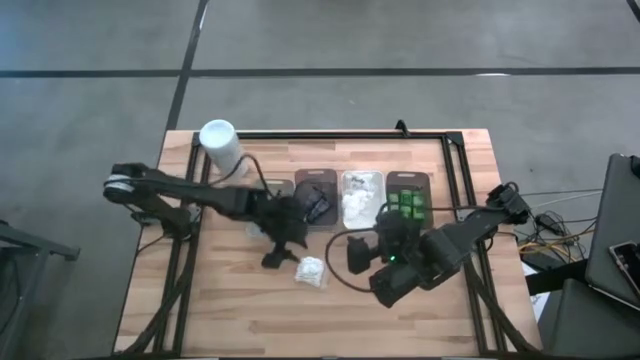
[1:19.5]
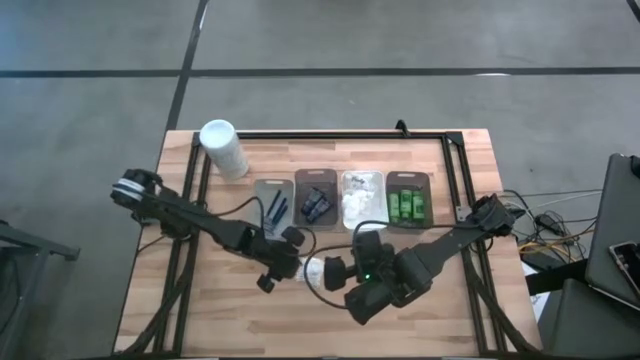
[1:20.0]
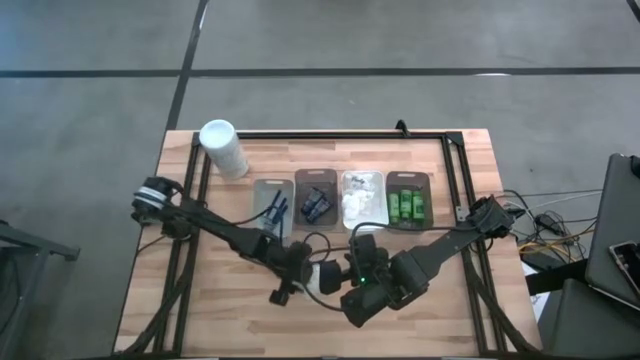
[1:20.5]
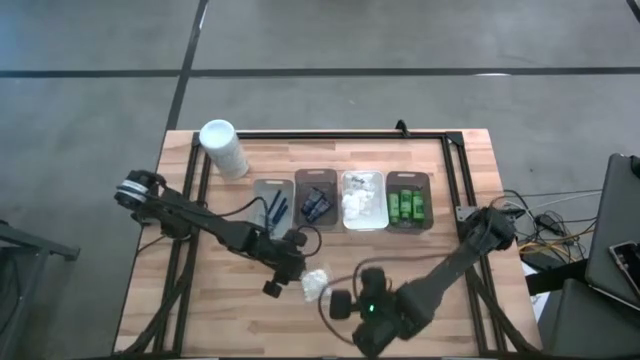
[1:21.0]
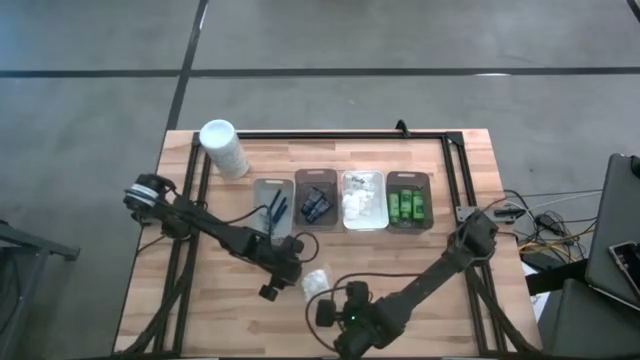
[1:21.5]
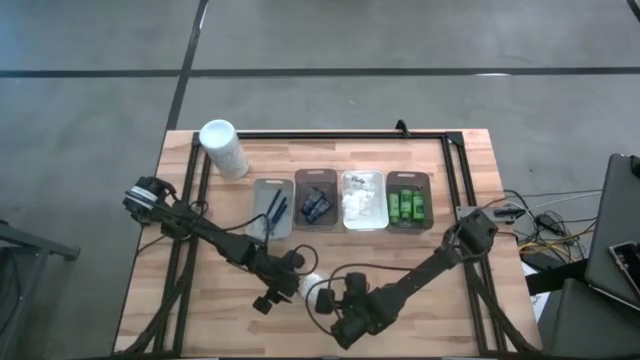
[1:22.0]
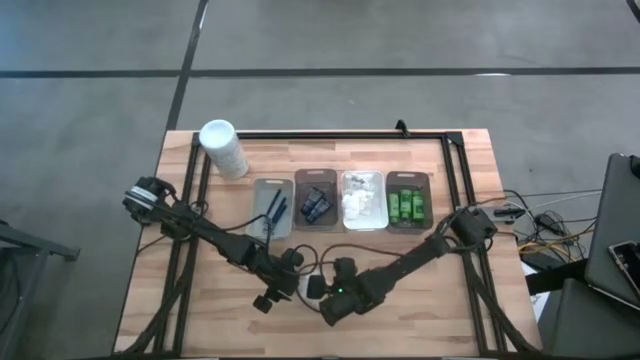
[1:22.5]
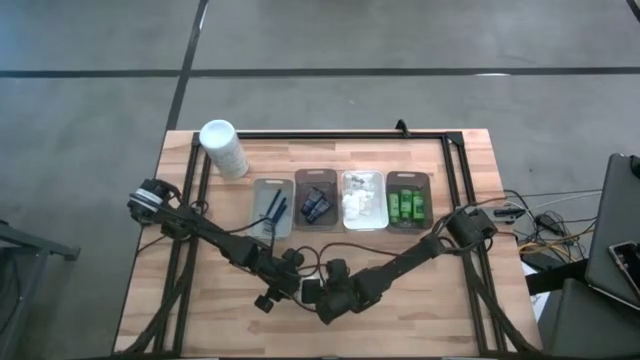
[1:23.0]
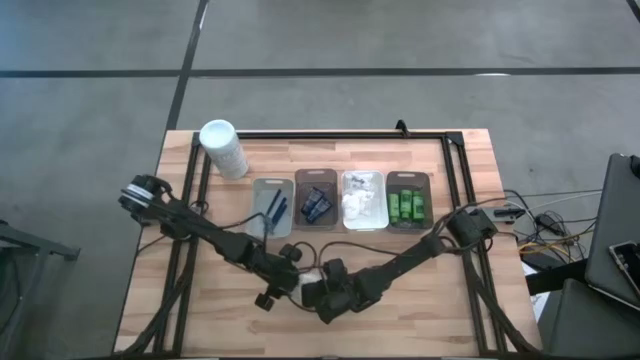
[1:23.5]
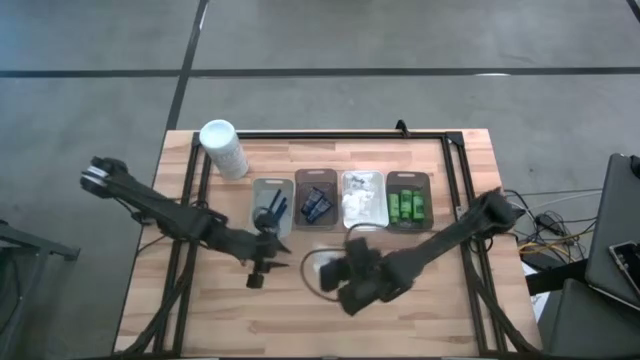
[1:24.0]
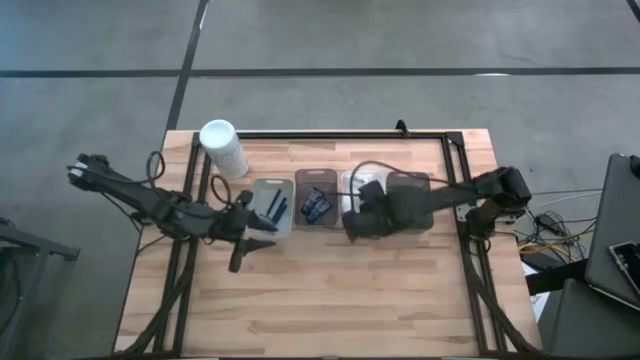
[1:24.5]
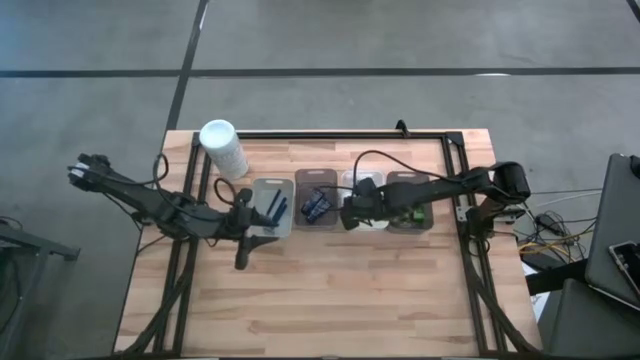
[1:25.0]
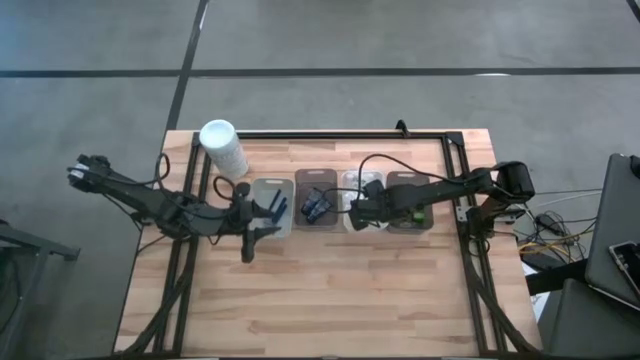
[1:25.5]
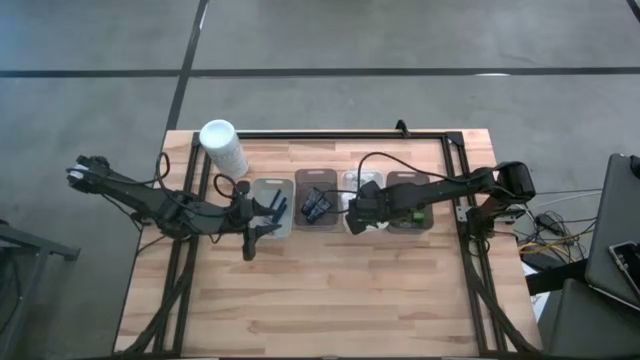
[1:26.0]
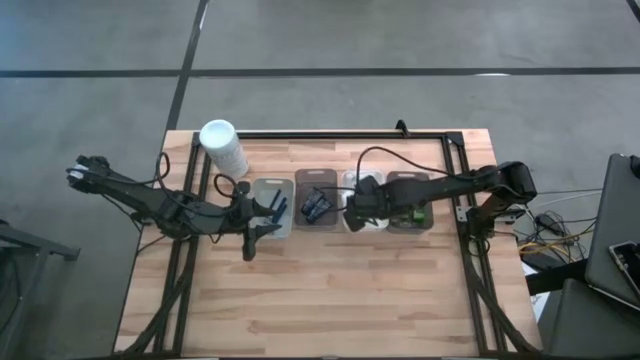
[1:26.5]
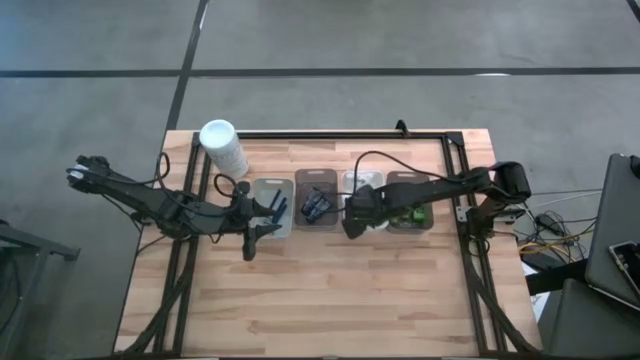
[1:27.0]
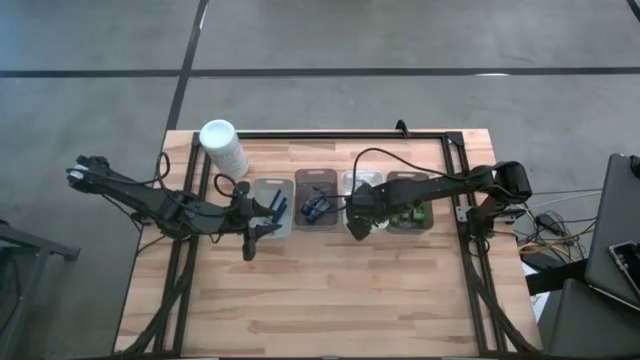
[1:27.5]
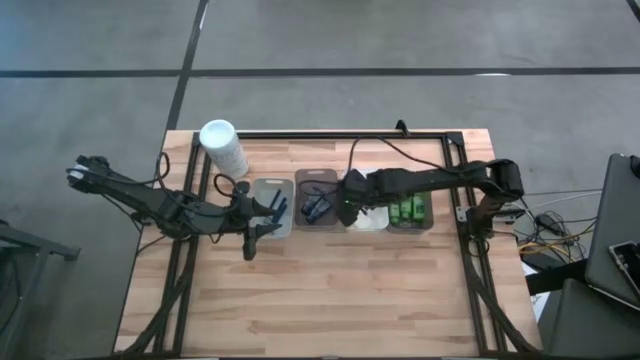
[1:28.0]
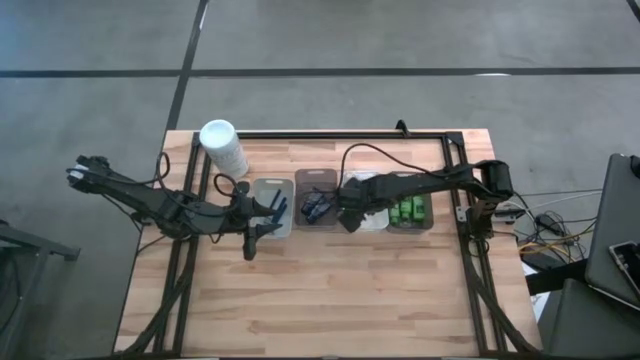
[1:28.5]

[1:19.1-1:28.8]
Task: Pick & Place Travel size toiletries
Put the transparent cotton pack into the white bin

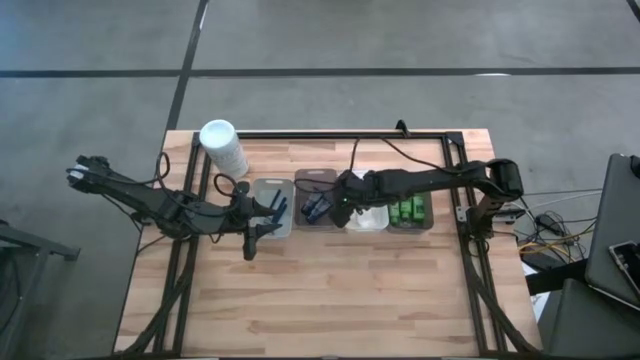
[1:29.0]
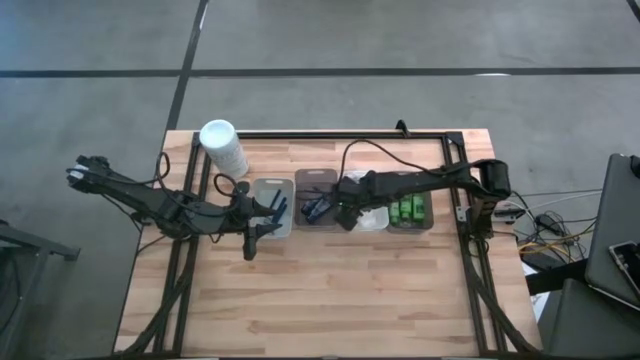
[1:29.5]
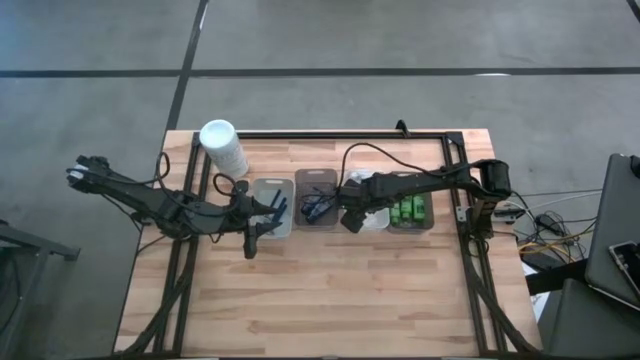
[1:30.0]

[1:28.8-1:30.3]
Adjust the transparent cotton packs in the white bin

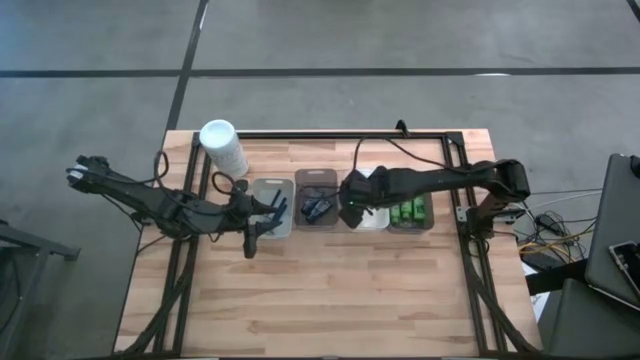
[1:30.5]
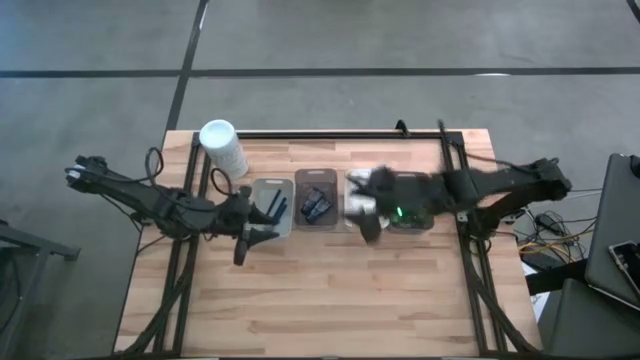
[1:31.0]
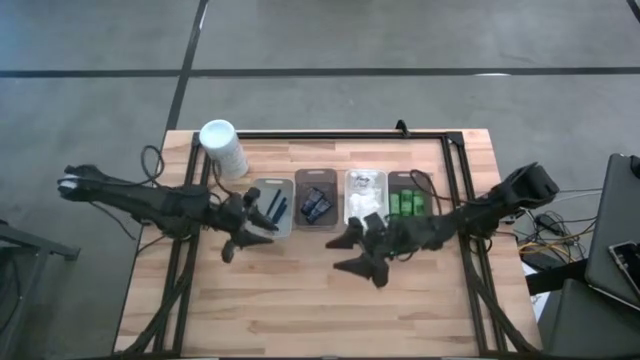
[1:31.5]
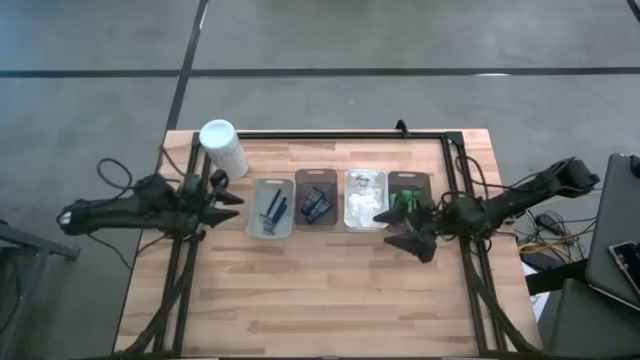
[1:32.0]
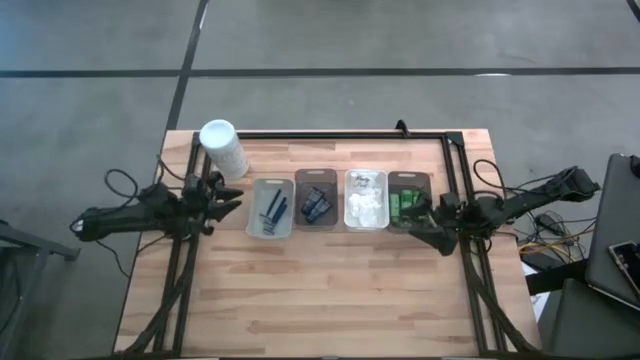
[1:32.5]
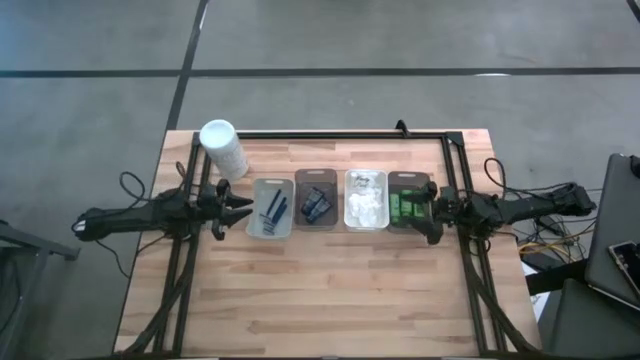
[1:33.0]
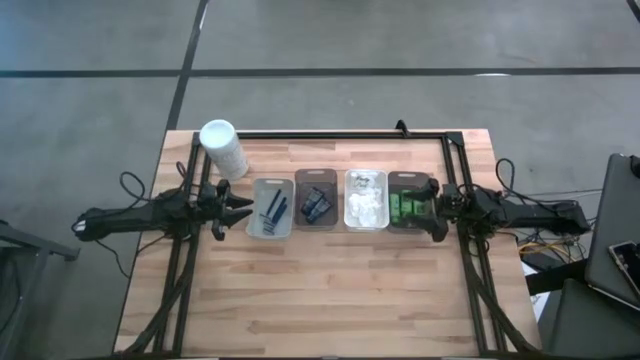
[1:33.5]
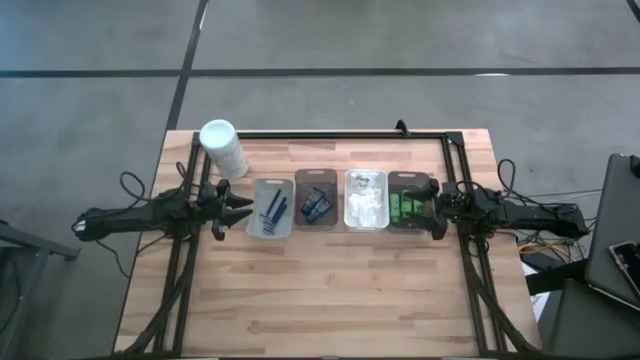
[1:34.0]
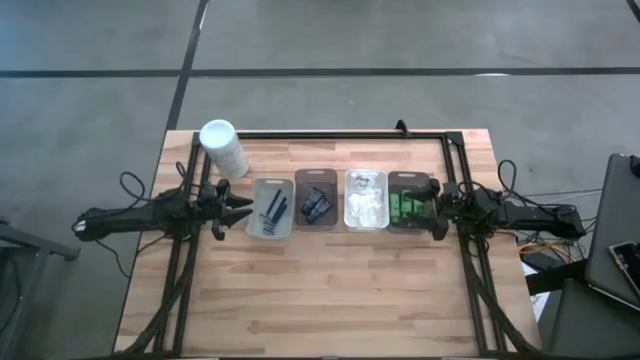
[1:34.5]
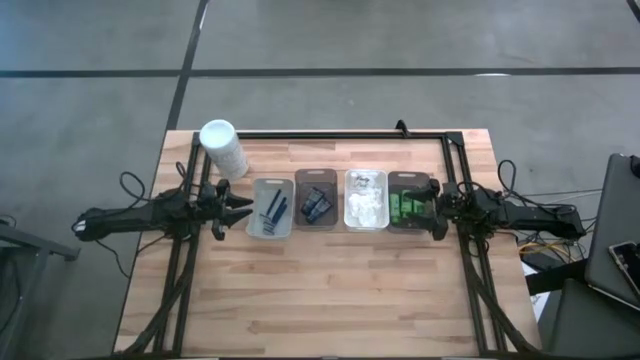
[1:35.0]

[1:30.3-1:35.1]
Return to Home Position

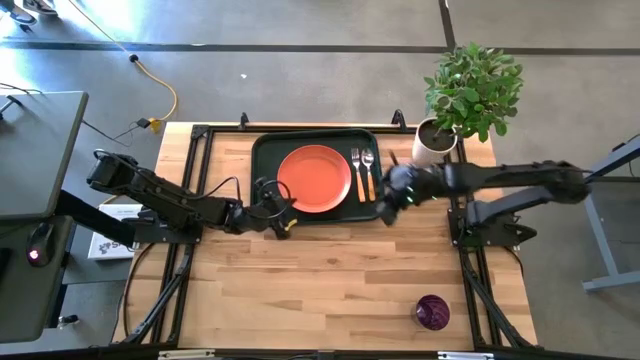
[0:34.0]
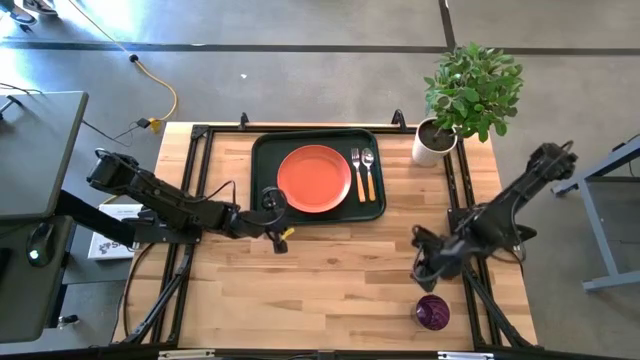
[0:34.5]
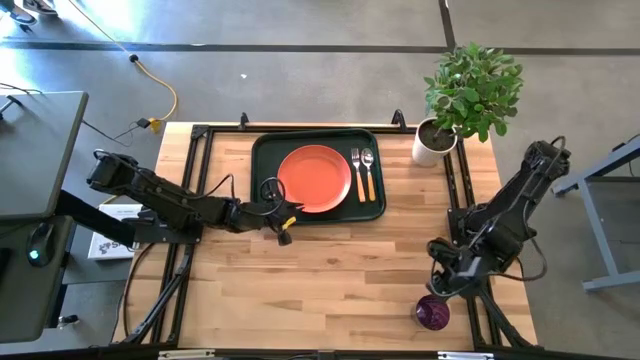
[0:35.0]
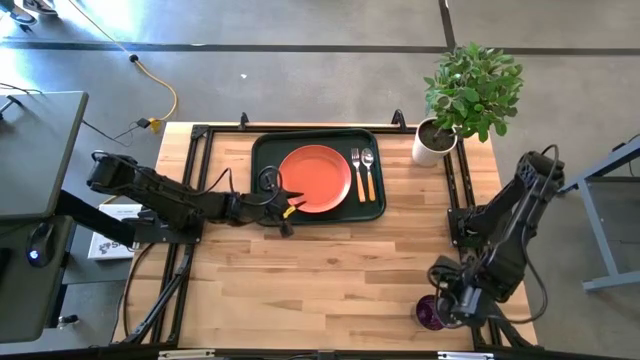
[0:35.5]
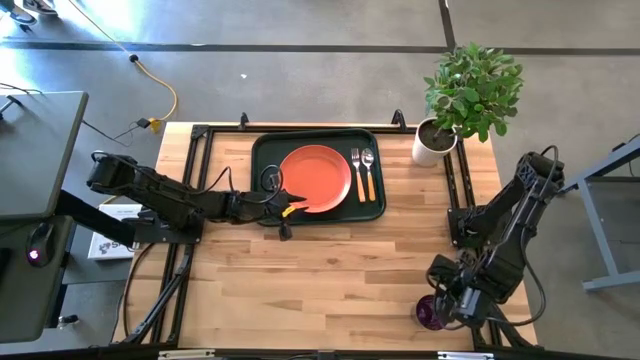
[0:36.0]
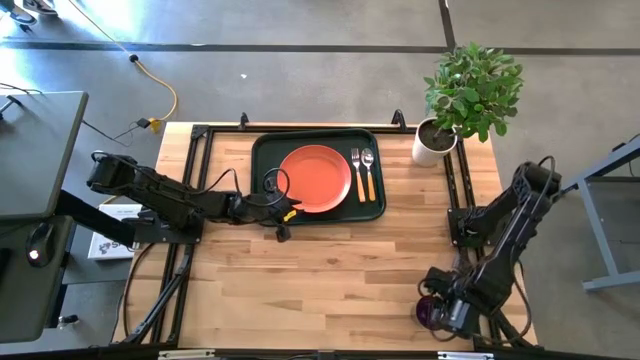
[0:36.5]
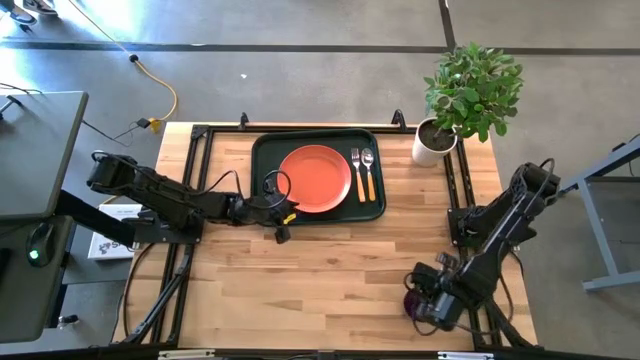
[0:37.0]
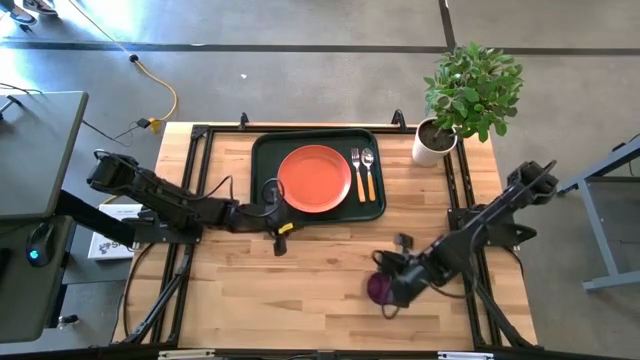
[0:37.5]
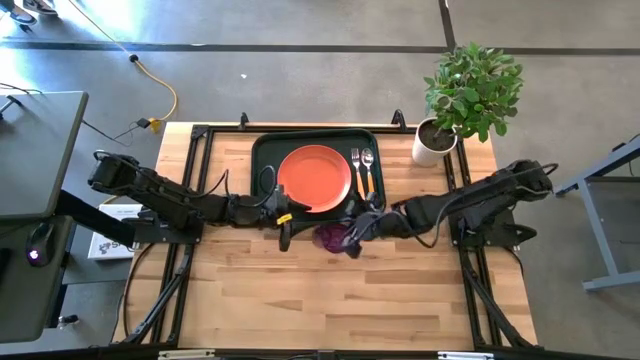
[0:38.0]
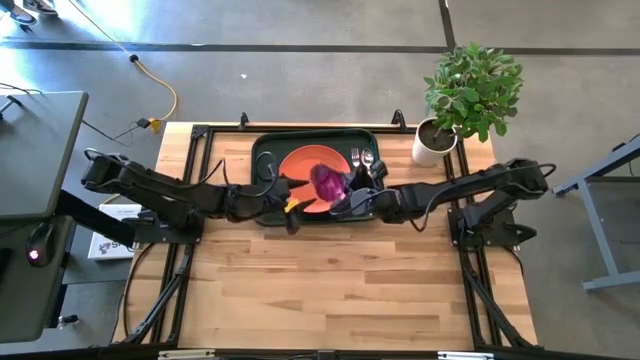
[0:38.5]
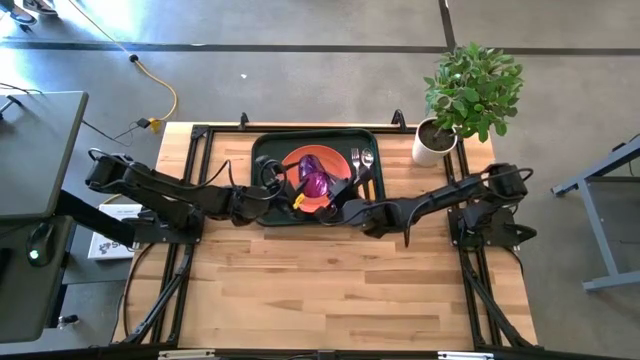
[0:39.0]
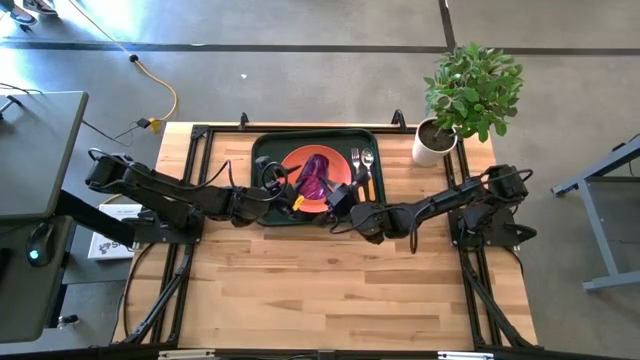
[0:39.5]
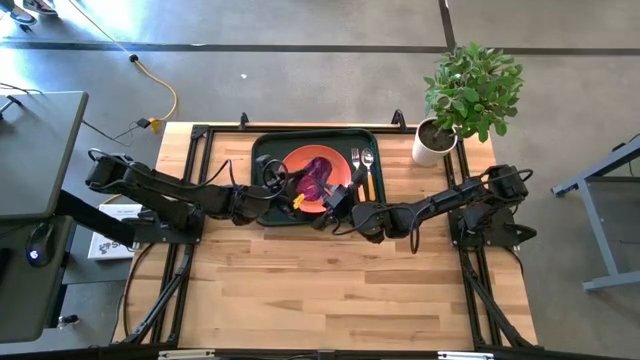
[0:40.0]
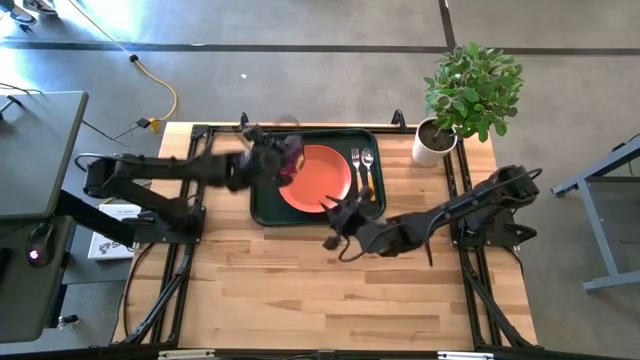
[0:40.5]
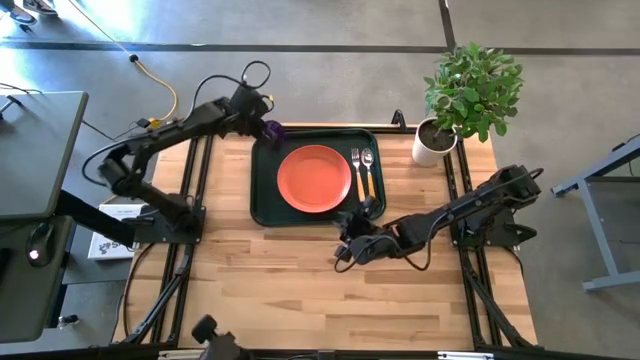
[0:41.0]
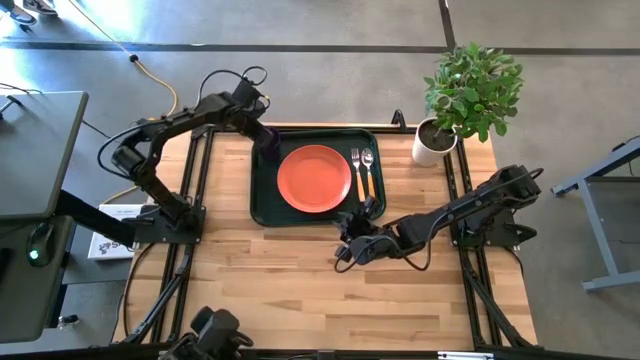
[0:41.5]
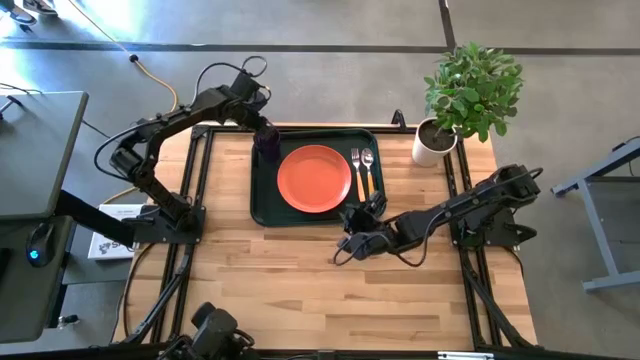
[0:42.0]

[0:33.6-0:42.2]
Task: Pick and place plate/cup/fork/spoon on tray
Put the purple glass on the tray to the top left of the orange plate
